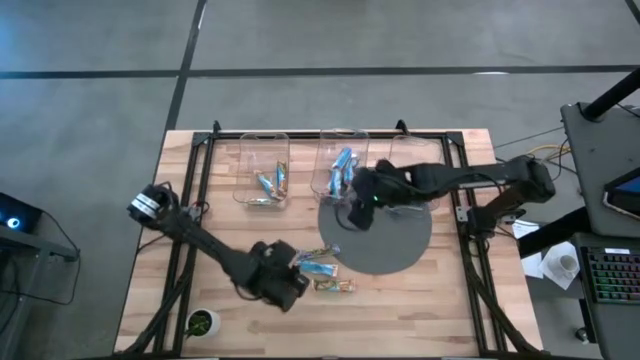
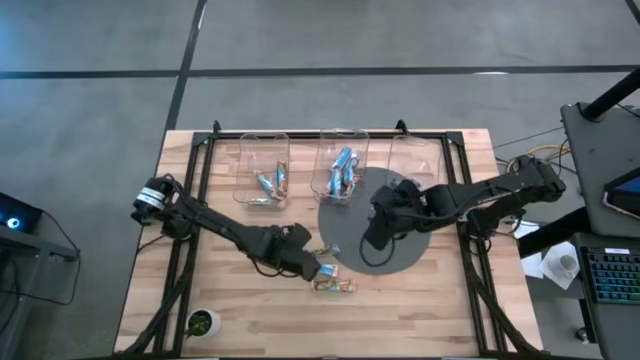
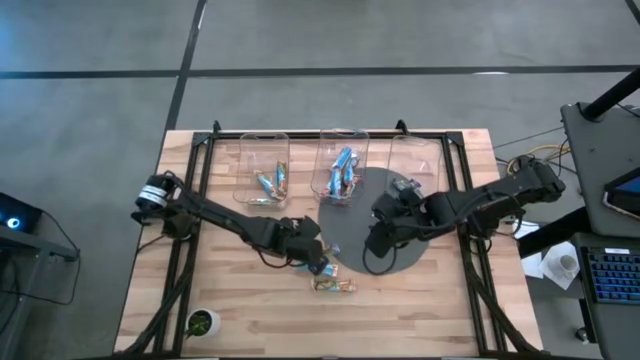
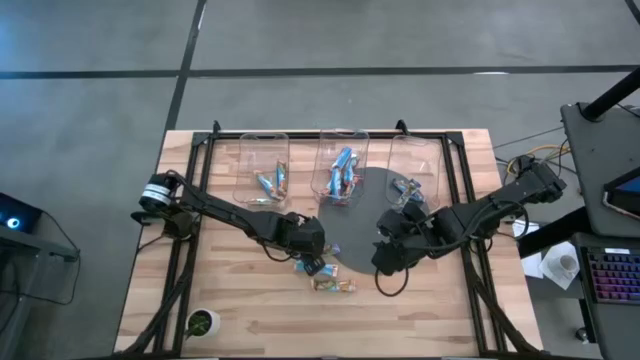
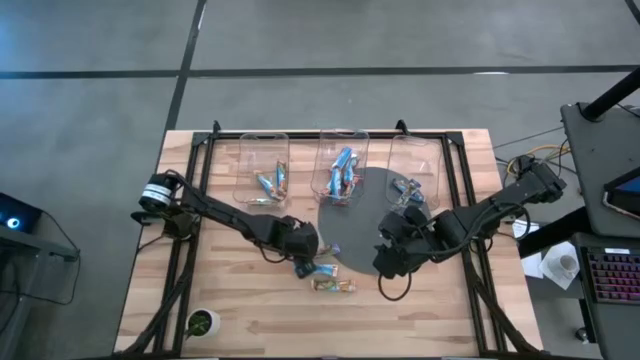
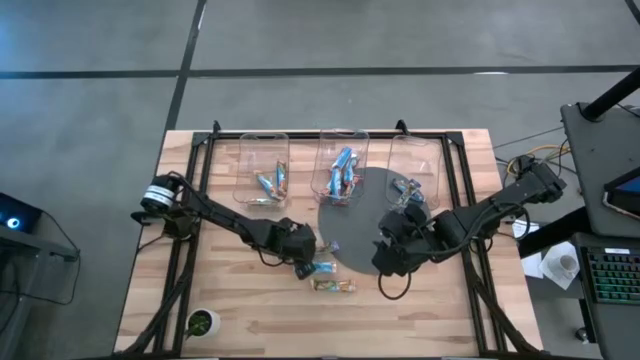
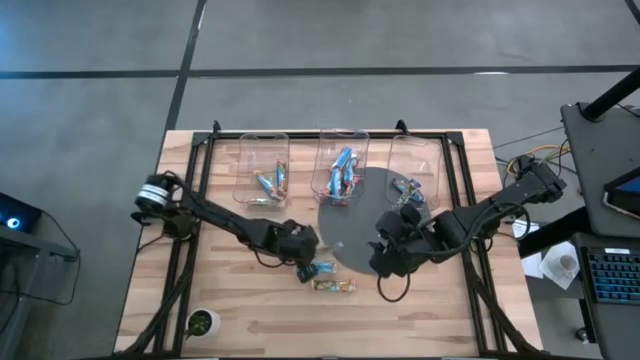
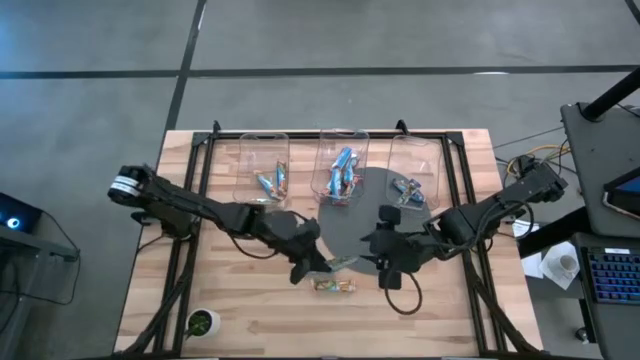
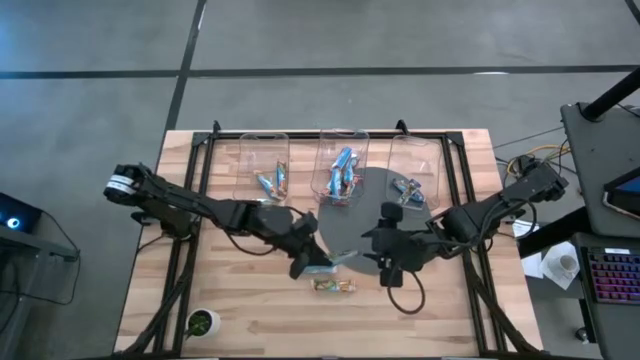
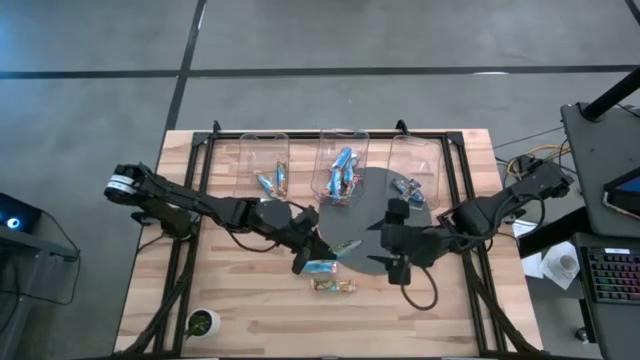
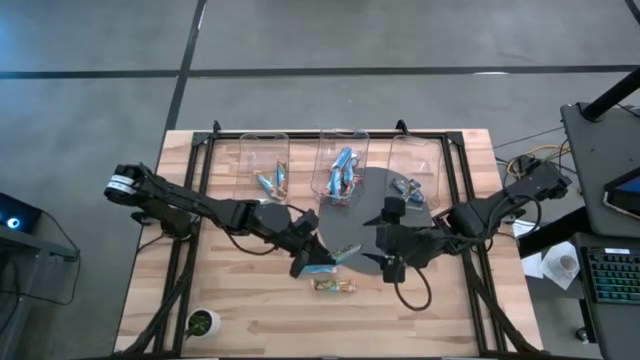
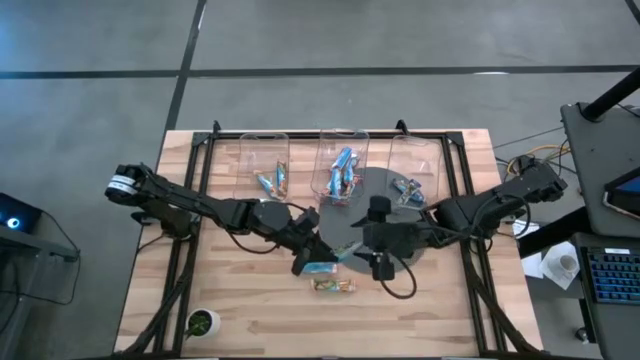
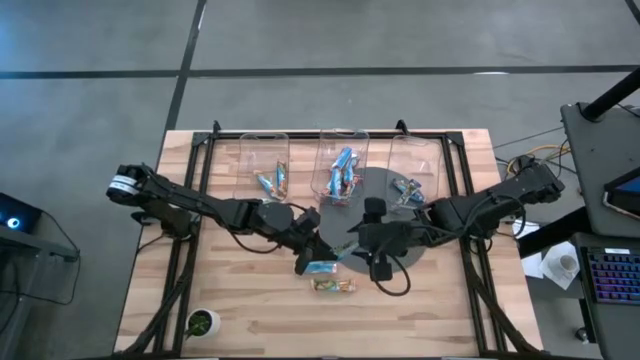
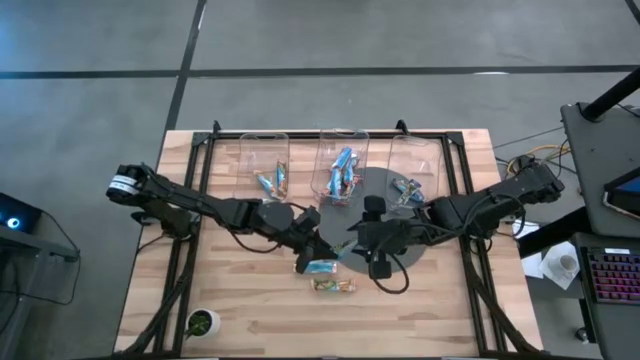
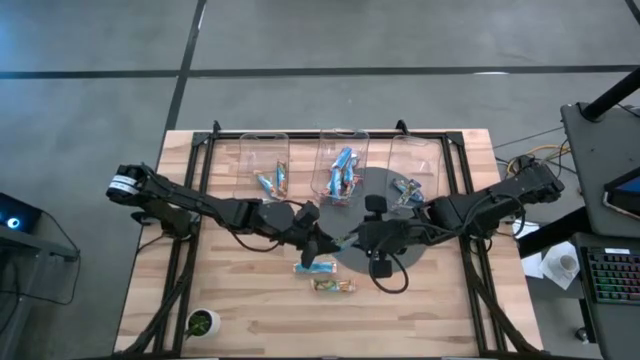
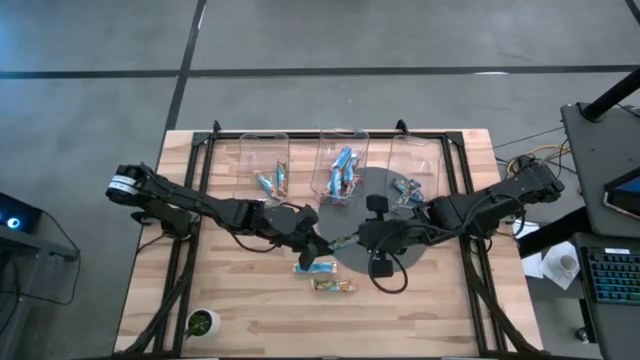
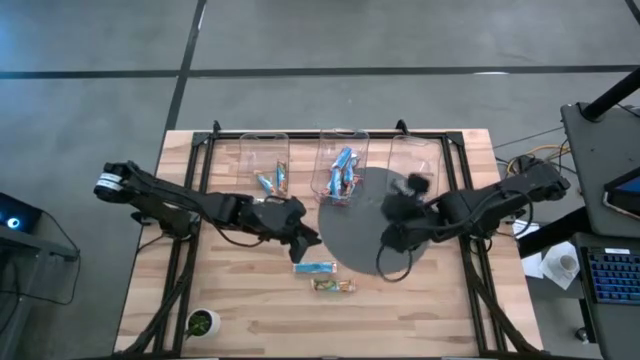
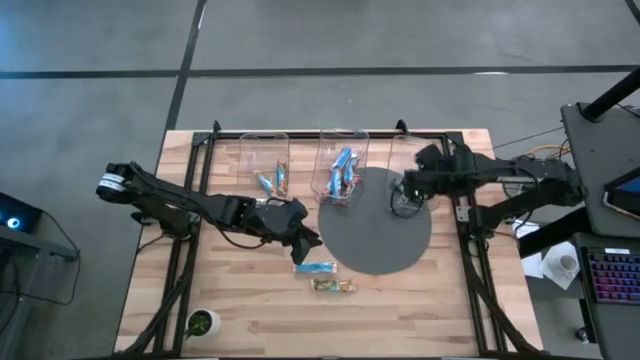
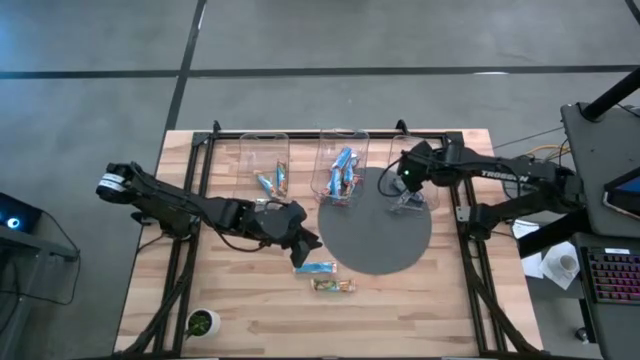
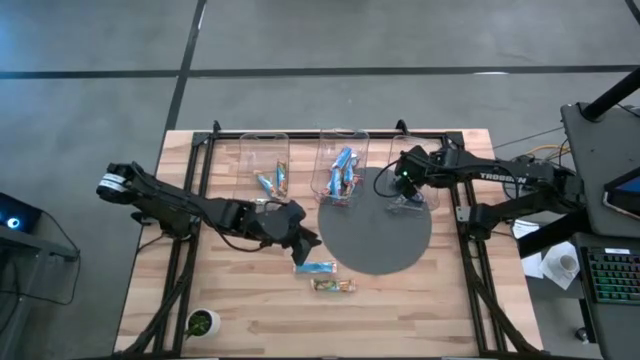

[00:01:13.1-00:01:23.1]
Task: Pick and place Granola Bars by type
Put the blue granola bar into the right transparent bin

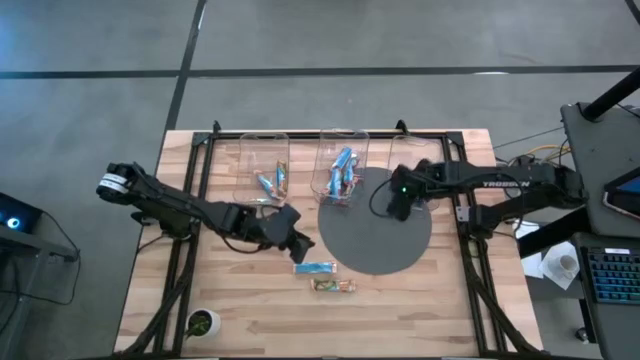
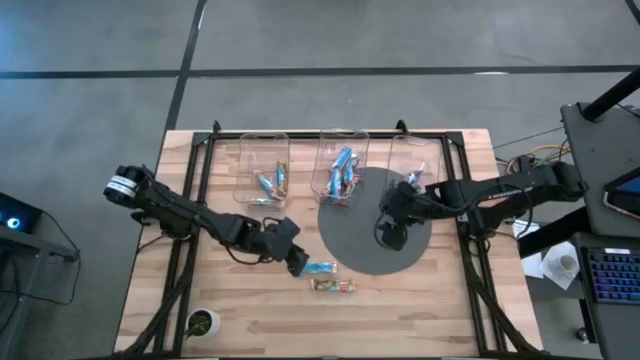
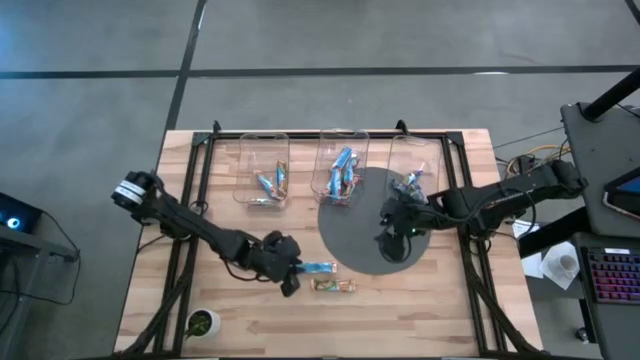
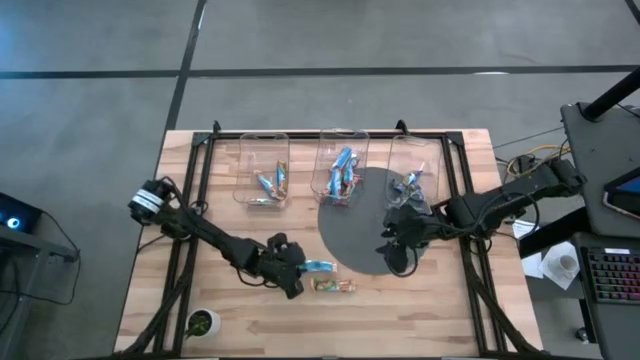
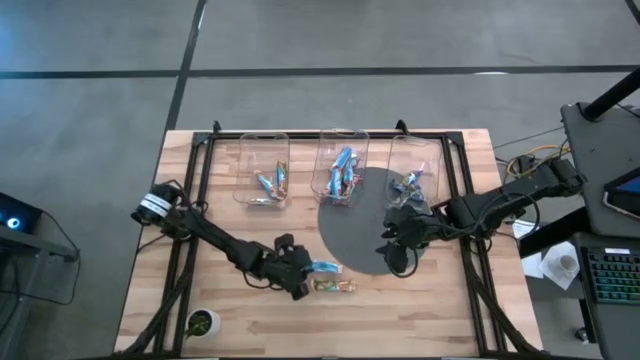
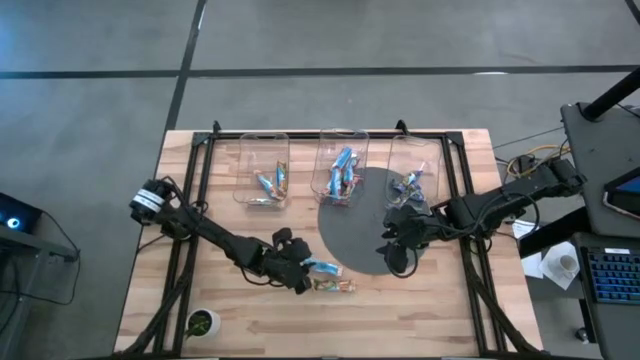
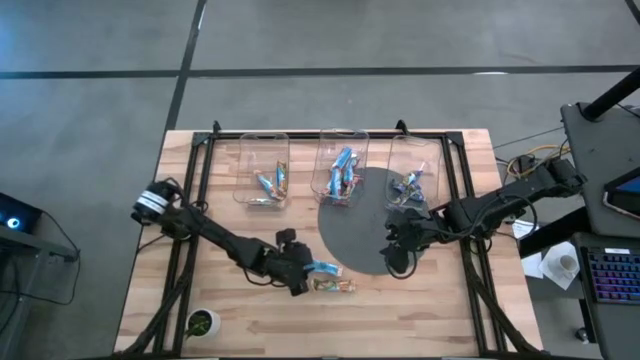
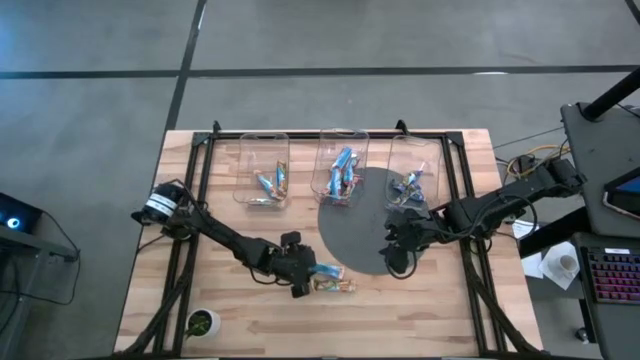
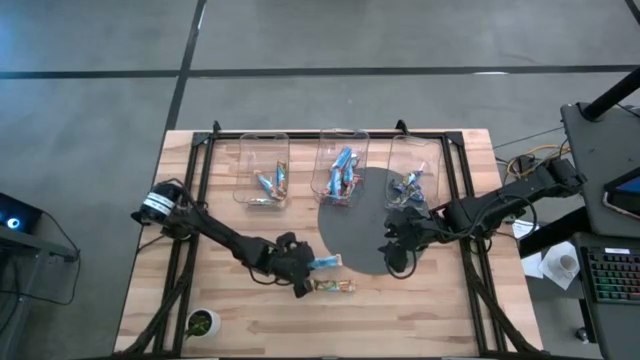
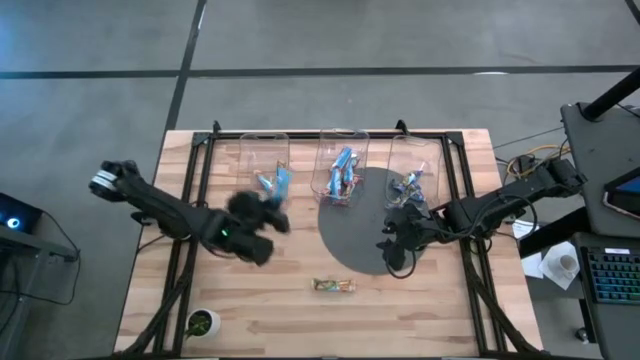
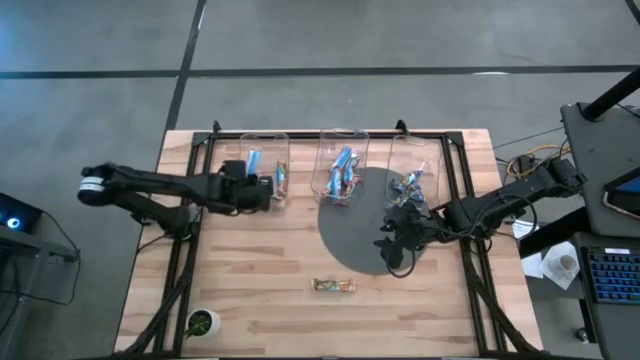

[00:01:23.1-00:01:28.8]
Put the yellow granola bar into the left transparent bin

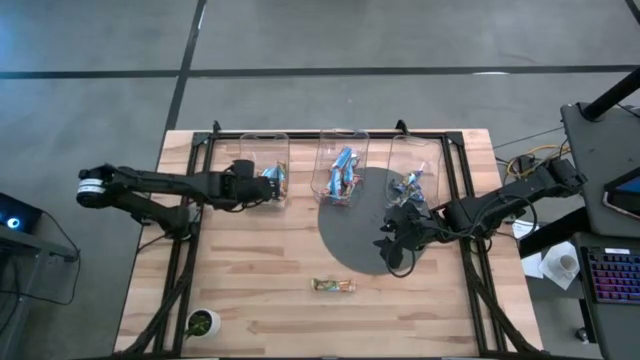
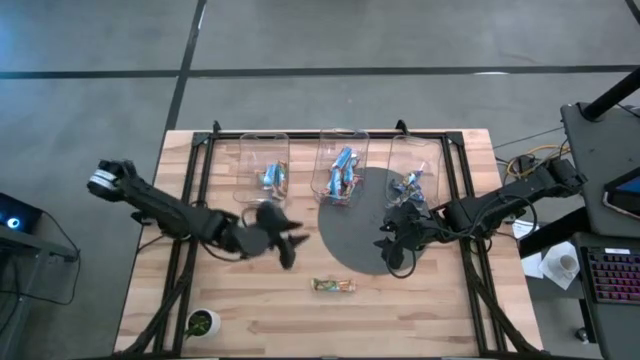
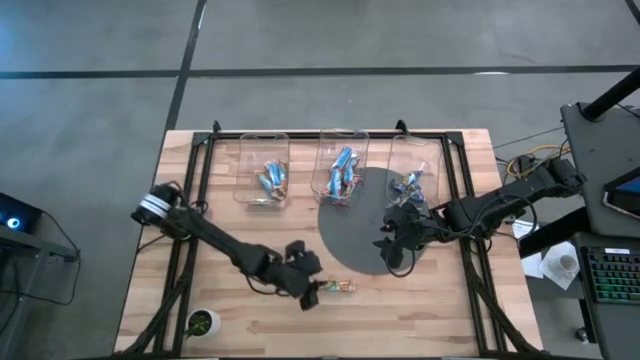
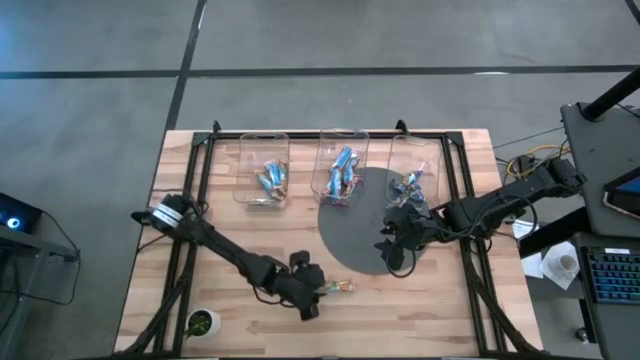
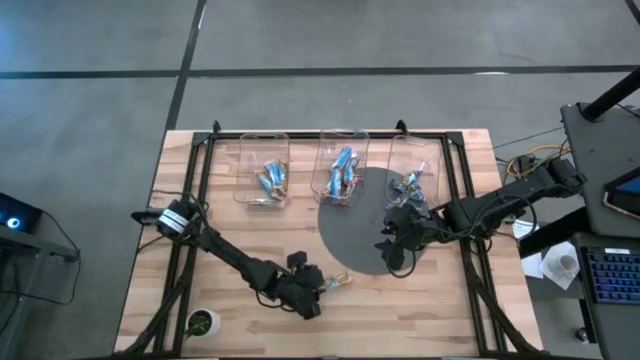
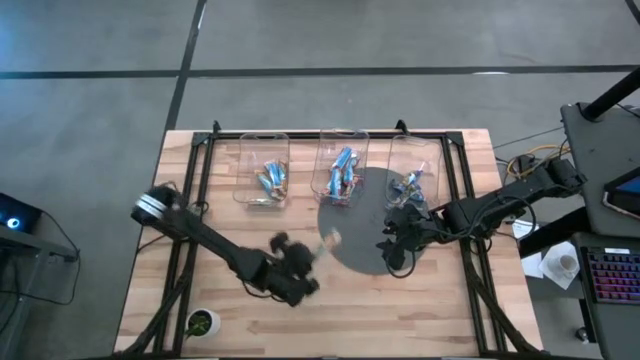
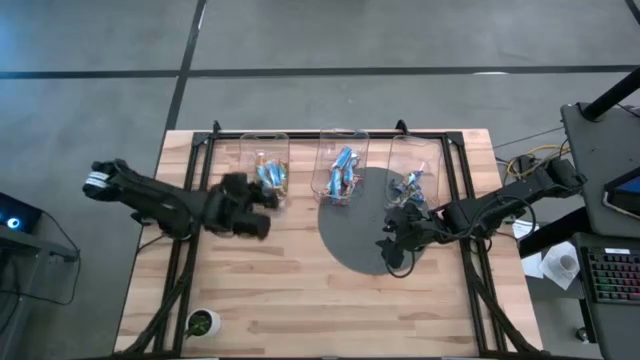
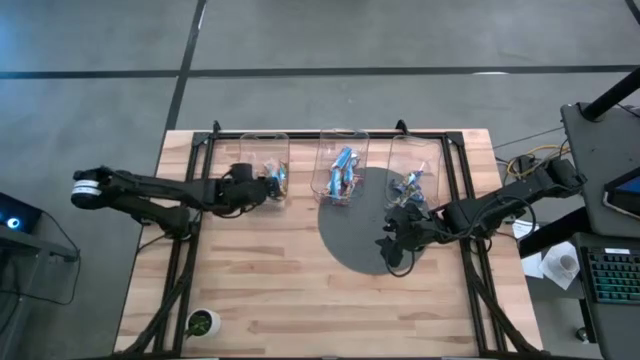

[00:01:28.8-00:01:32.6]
Put the yellow granola bar into the left transparent bin

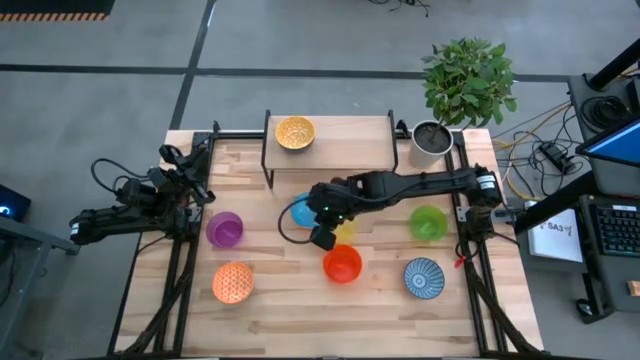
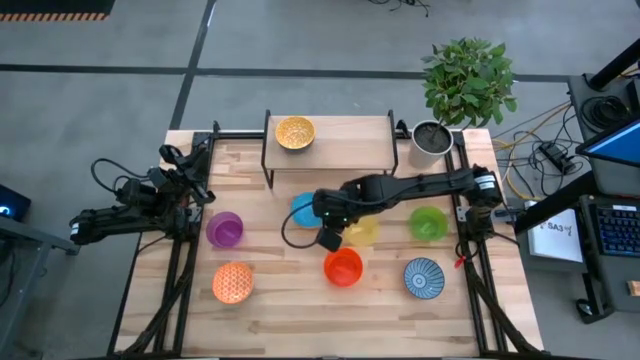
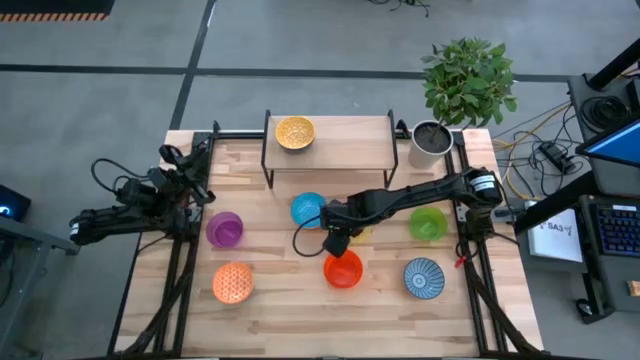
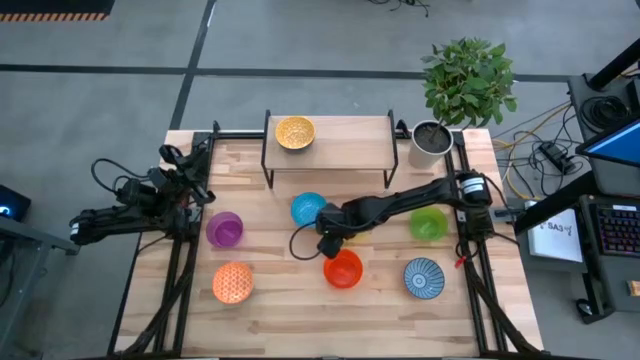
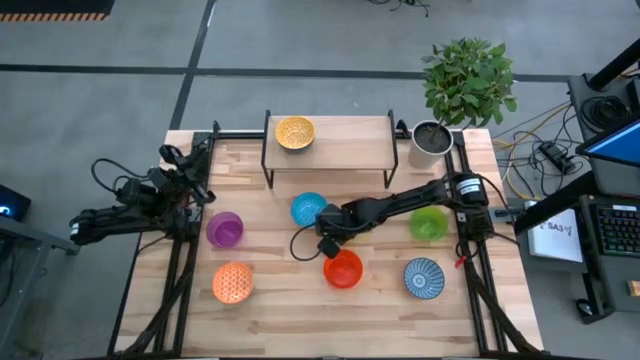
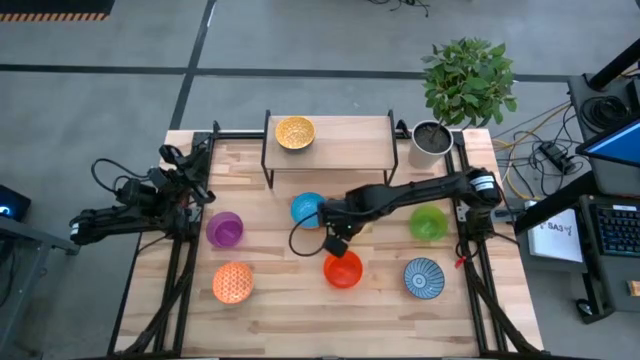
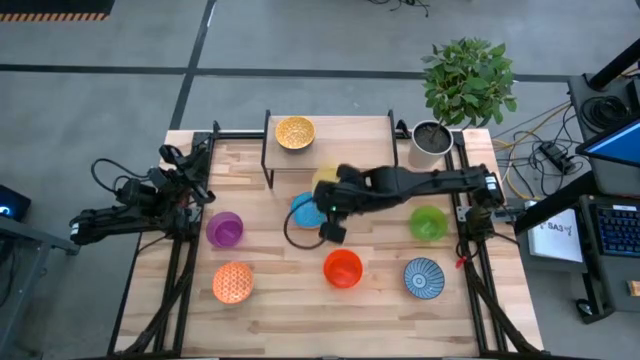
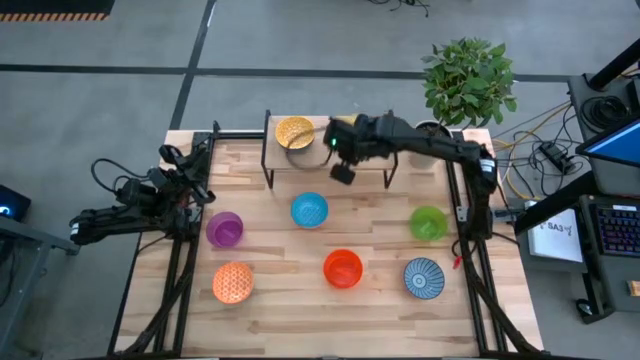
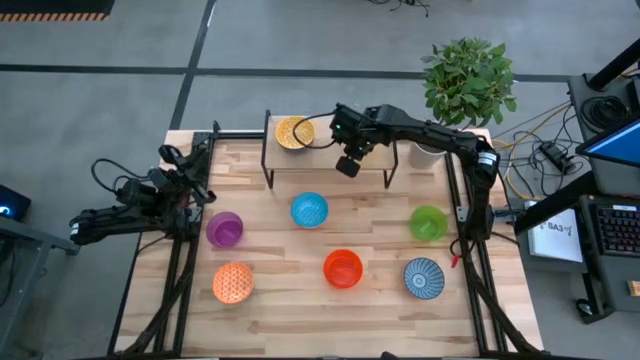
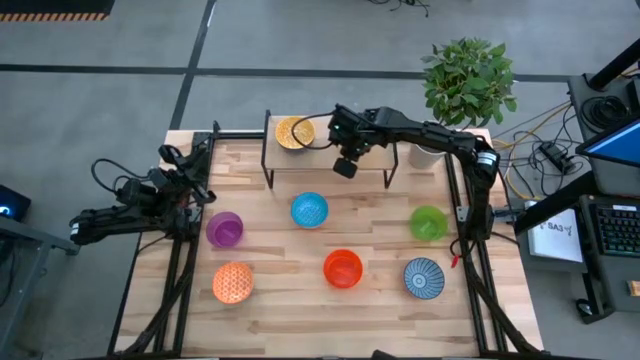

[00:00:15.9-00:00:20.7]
Task: Place and stack bowls onto a shelf
Put the light yellow bowl on the shelf
